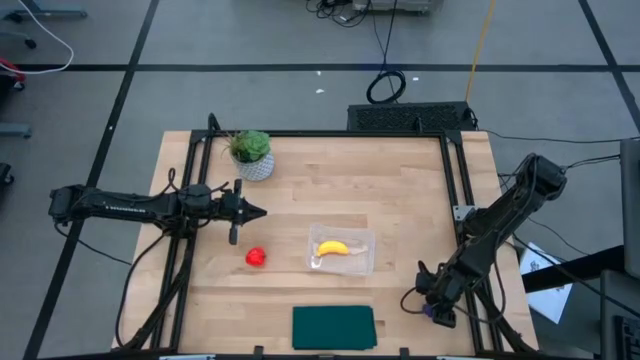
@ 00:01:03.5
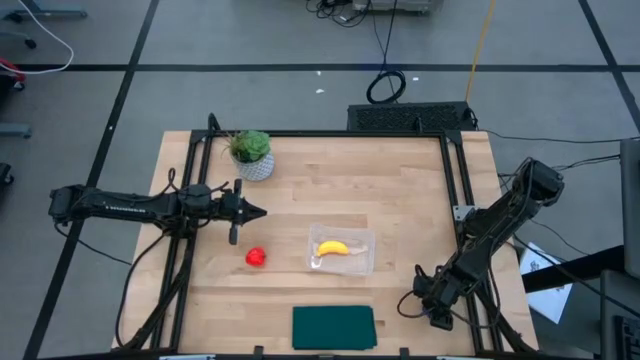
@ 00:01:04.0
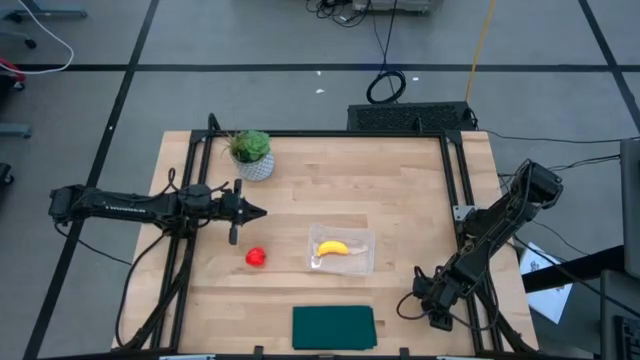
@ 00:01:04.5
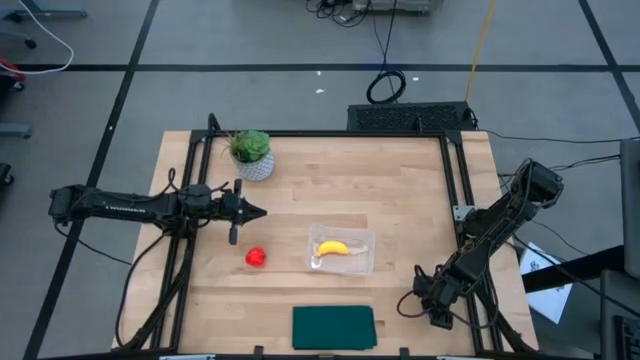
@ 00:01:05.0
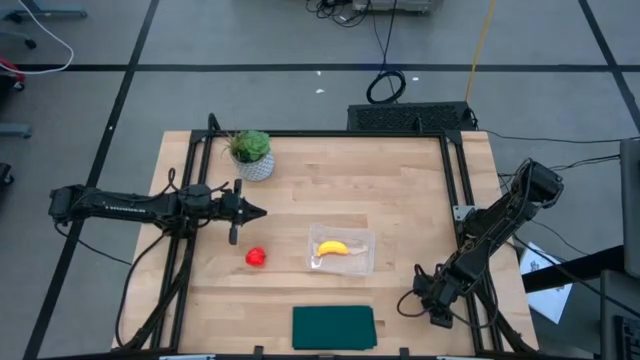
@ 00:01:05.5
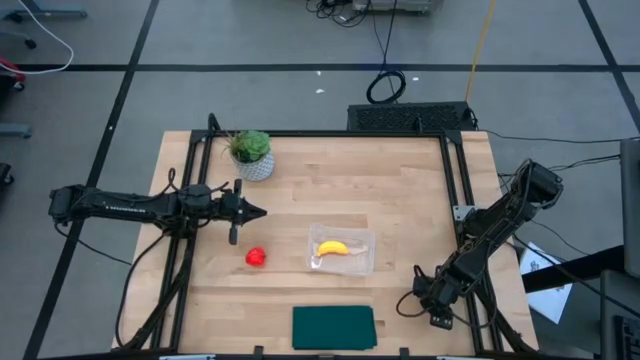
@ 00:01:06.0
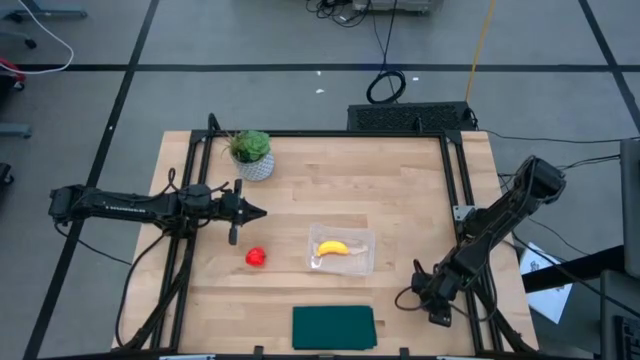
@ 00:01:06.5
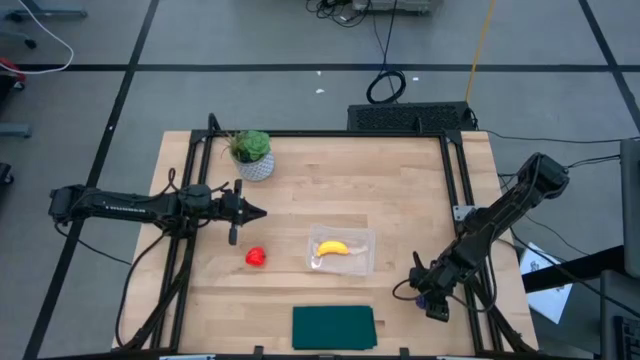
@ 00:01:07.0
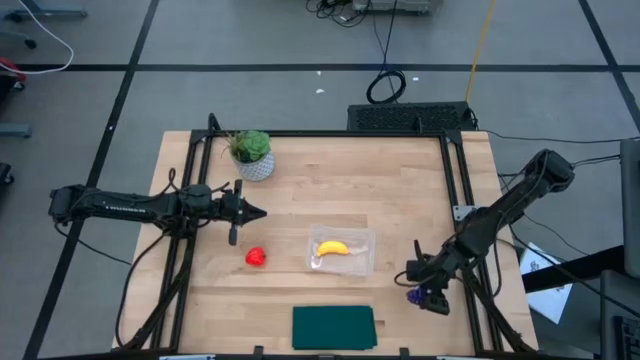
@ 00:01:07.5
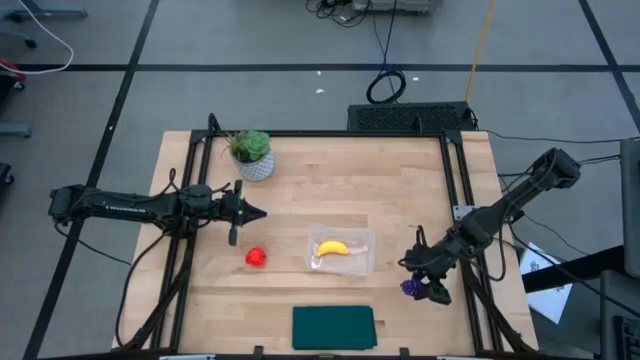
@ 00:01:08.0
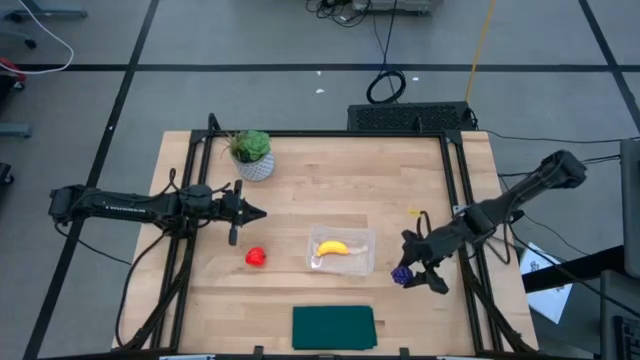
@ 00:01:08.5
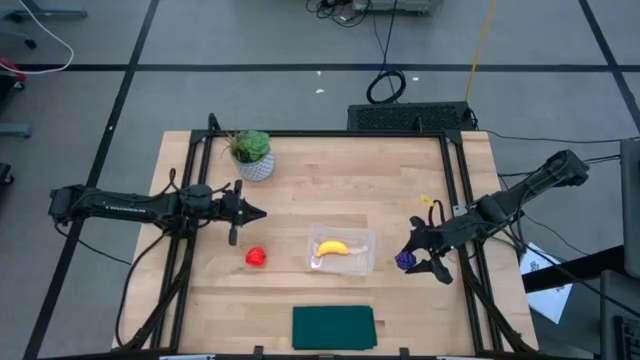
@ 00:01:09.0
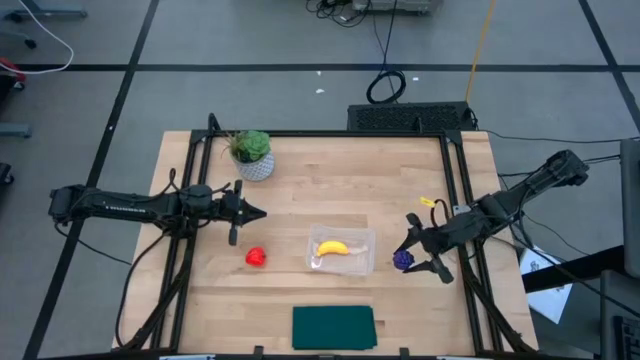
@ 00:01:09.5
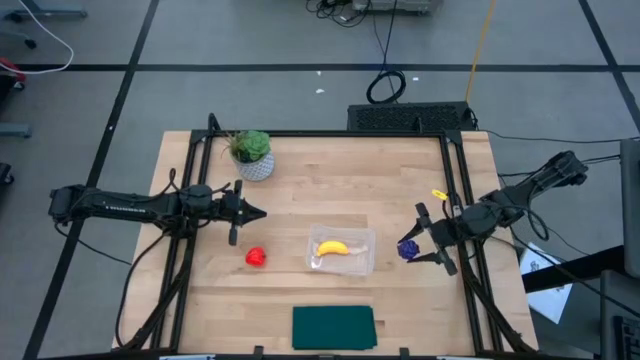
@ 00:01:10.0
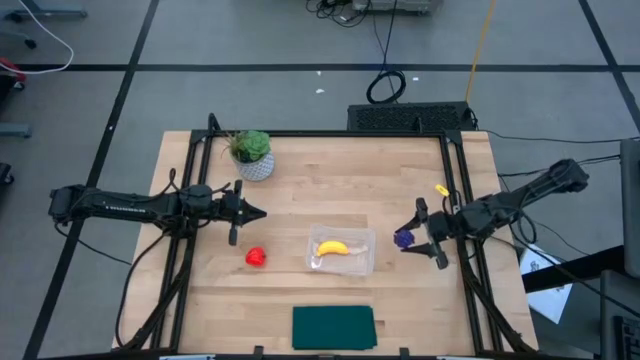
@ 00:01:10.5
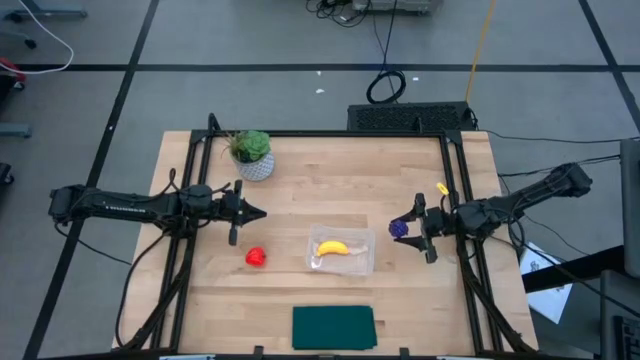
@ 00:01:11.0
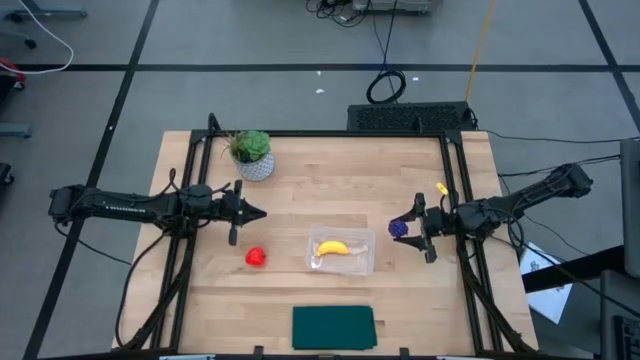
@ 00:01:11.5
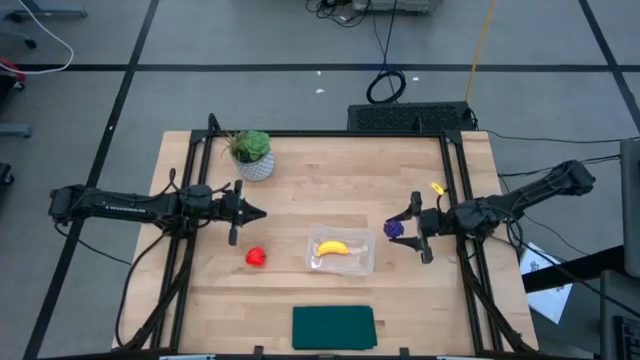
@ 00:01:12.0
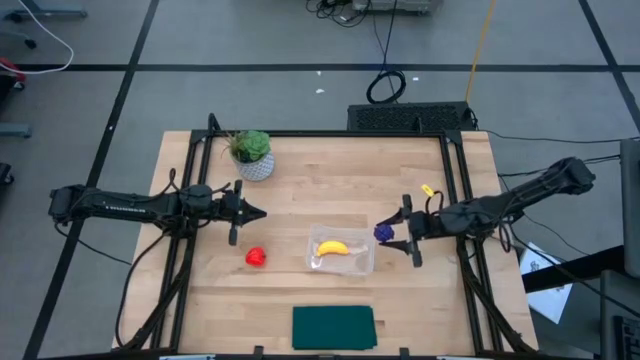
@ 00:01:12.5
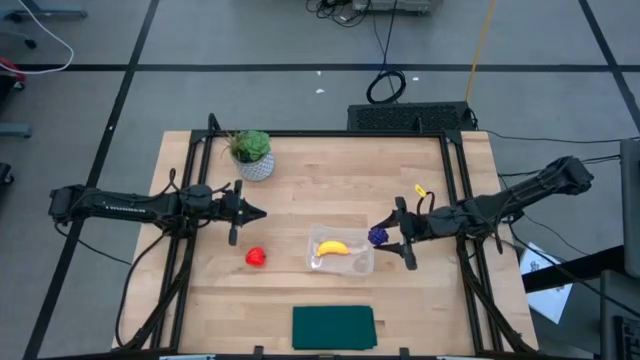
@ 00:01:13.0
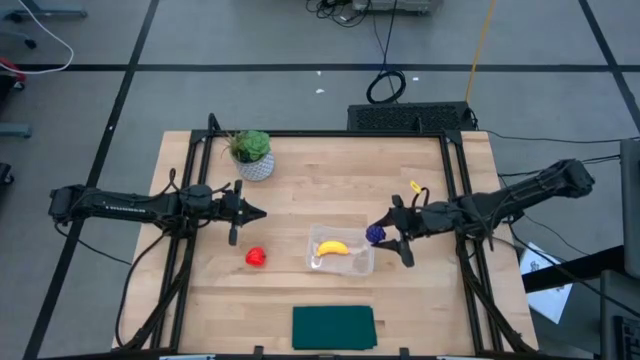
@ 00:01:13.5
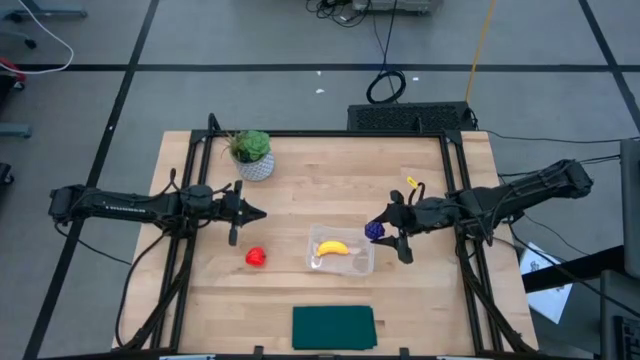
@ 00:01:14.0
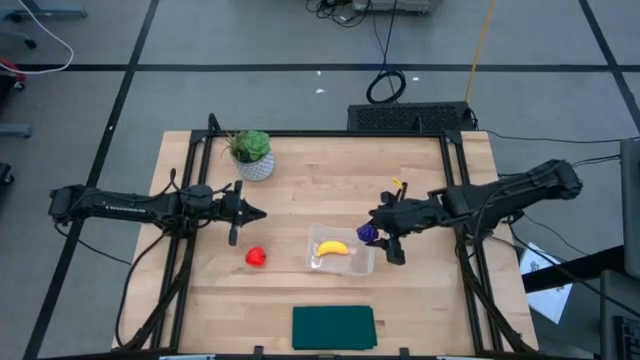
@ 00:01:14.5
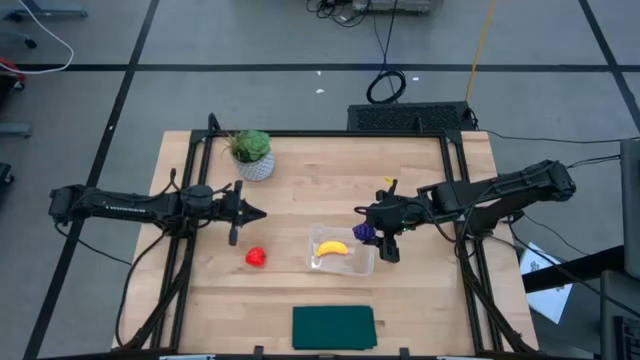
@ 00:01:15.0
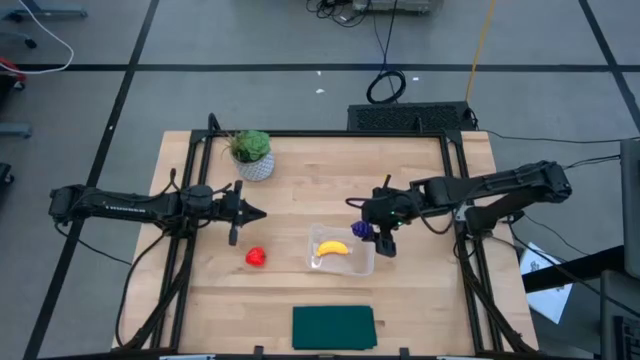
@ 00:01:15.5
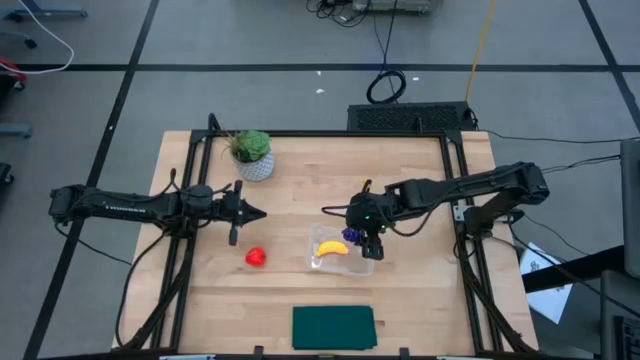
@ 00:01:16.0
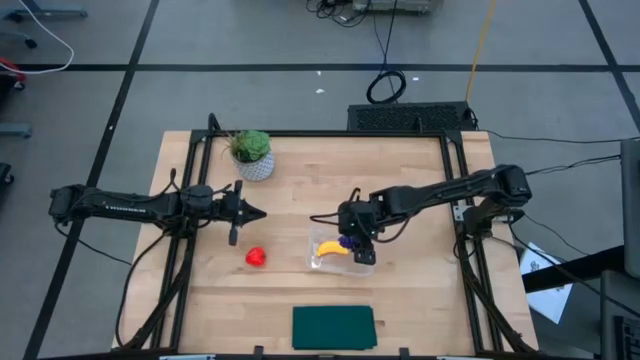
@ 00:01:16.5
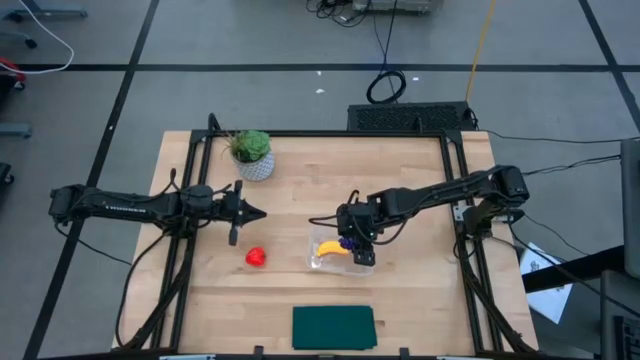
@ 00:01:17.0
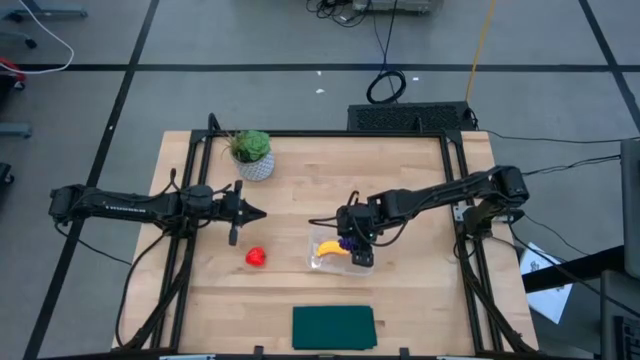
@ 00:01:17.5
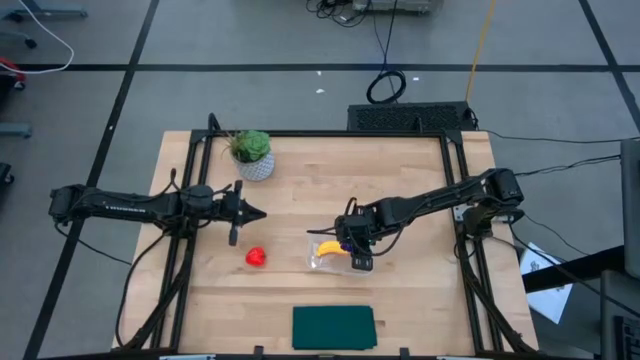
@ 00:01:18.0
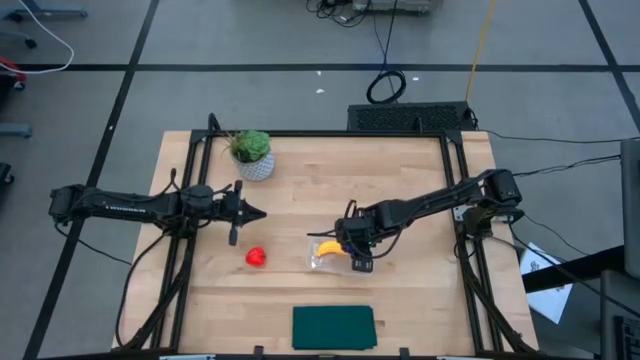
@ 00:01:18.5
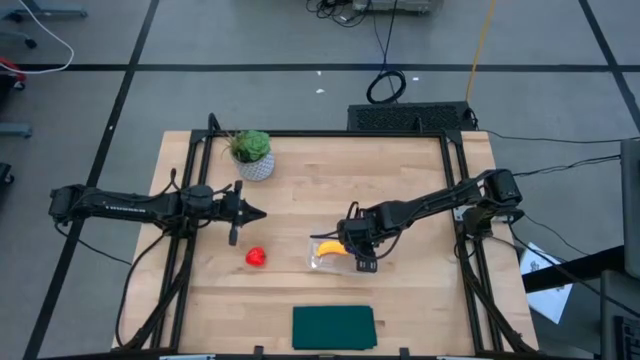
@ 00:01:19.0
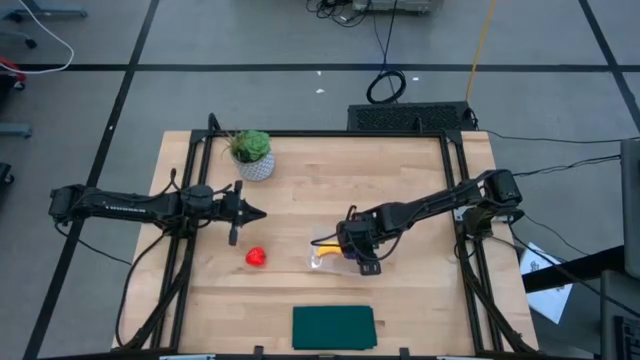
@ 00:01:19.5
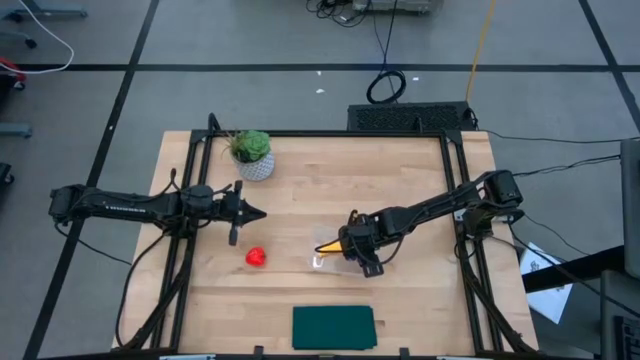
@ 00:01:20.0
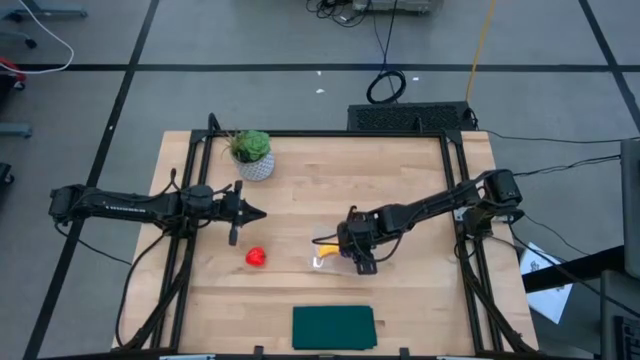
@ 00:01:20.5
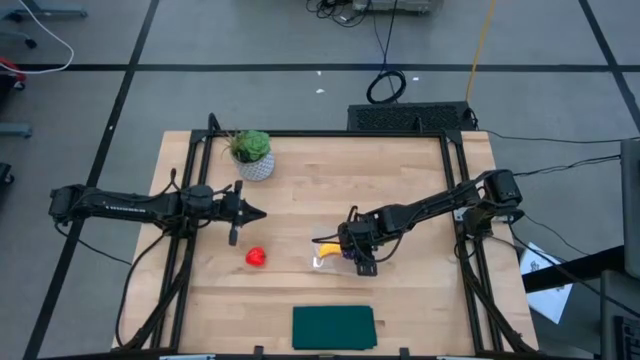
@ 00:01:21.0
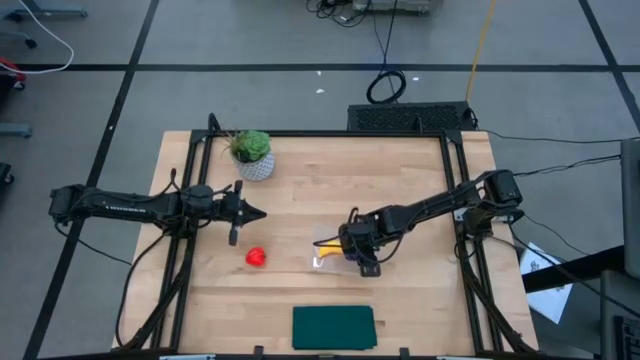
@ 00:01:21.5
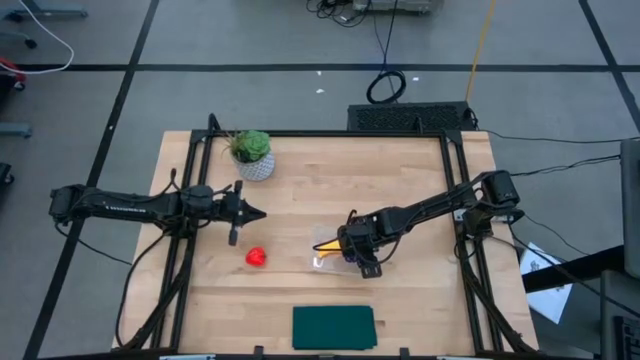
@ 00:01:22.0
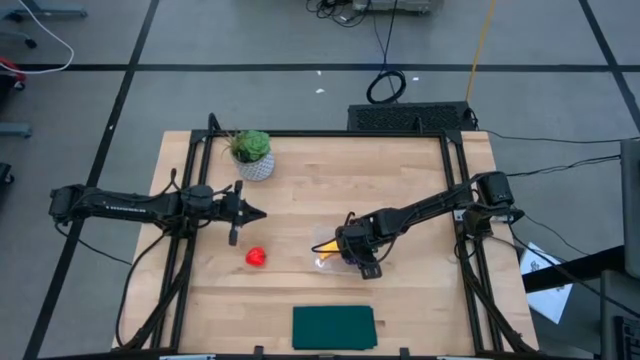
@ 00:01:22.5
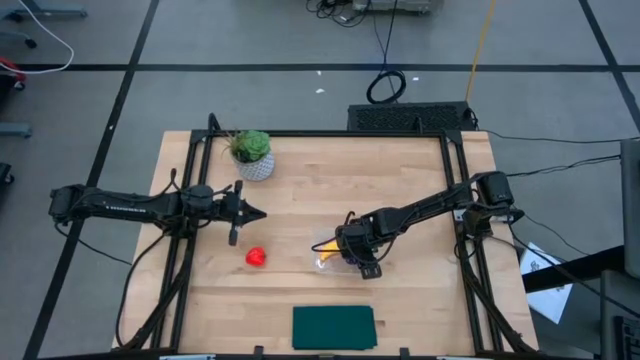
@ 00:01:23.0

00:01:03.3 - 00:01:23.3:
Task: Pick and placing Produce into tupperware
Put the grapes into the transparent bin

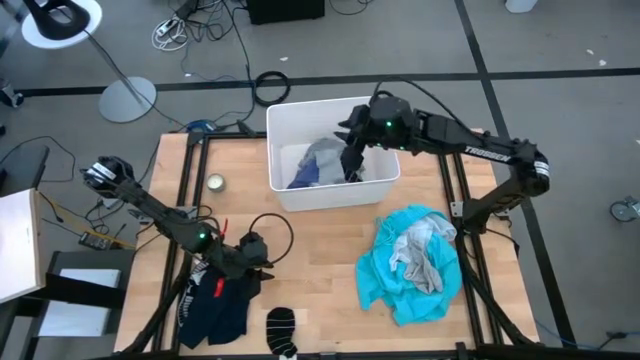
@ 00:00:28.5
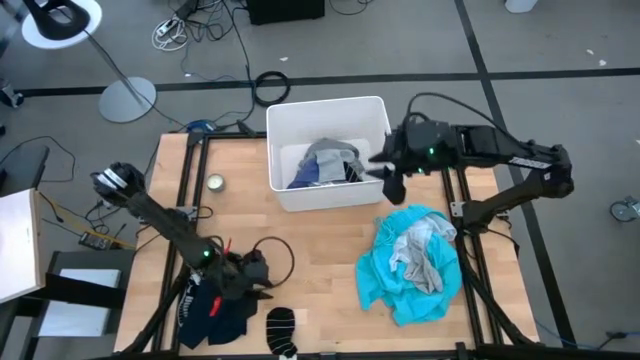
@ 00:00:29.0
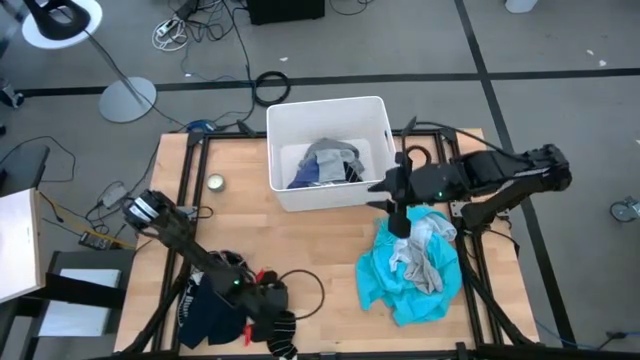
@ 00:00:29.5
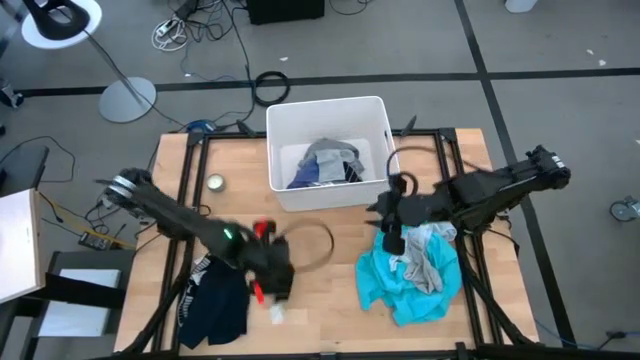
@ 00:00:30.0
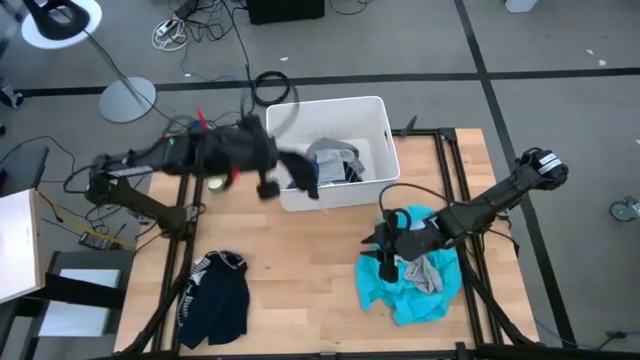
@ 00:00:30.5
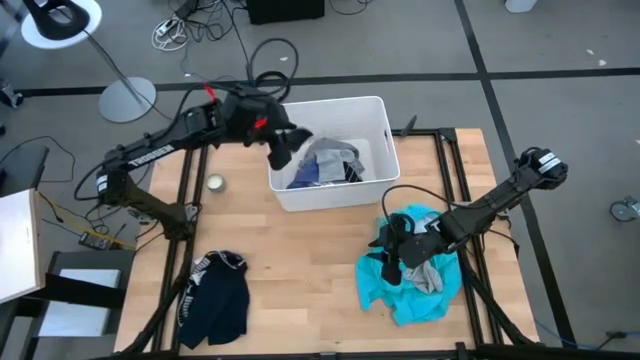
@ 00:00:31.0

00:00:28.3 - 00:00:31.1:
Task: Sort clothes
Put the black sock into the white laundry organizer
